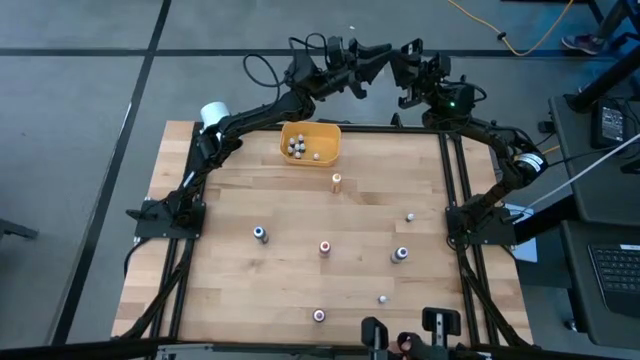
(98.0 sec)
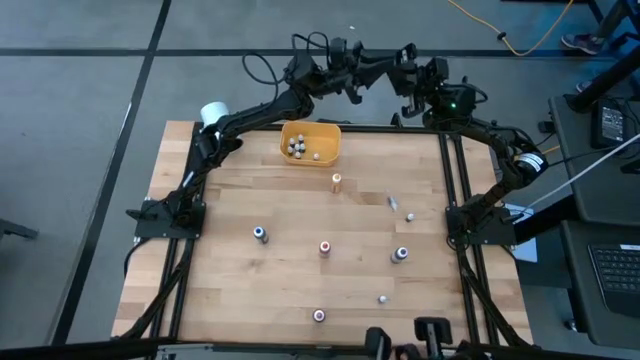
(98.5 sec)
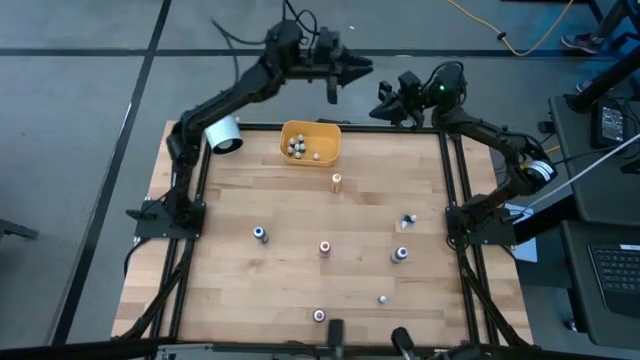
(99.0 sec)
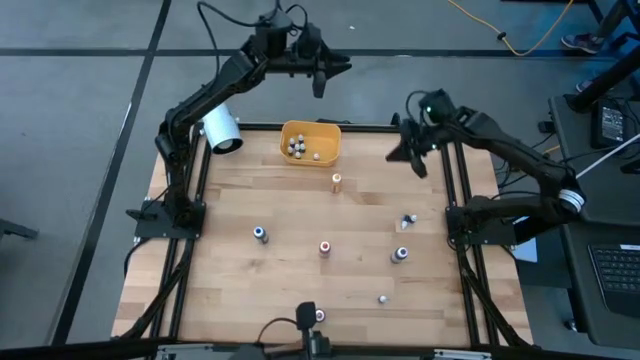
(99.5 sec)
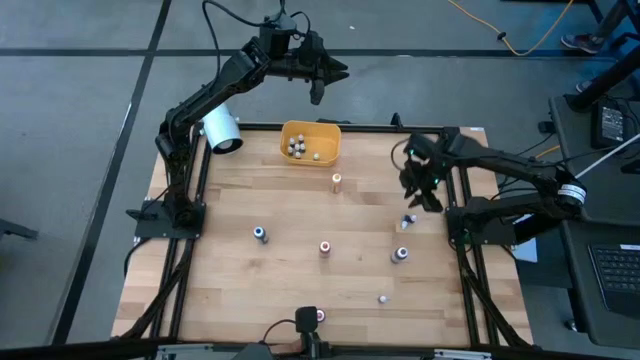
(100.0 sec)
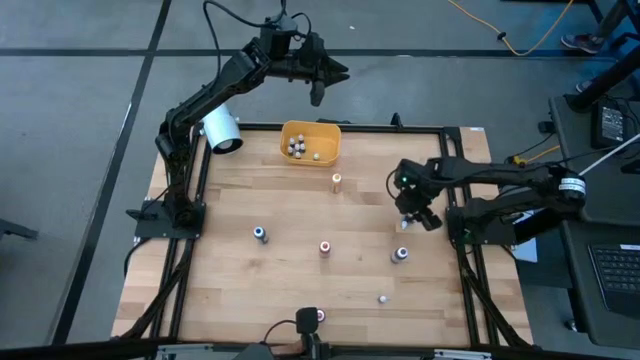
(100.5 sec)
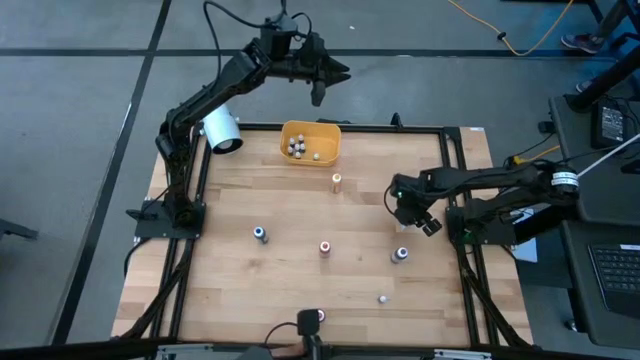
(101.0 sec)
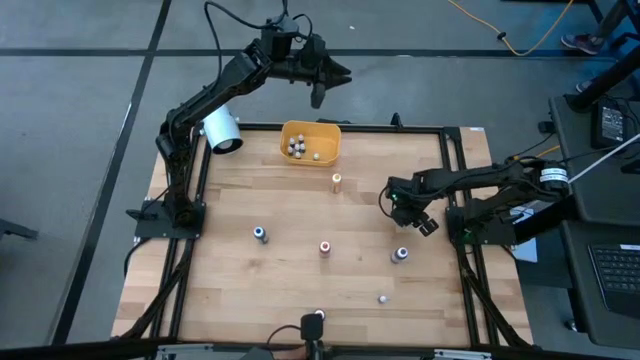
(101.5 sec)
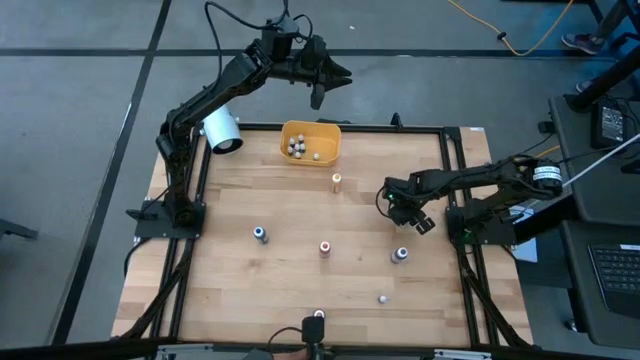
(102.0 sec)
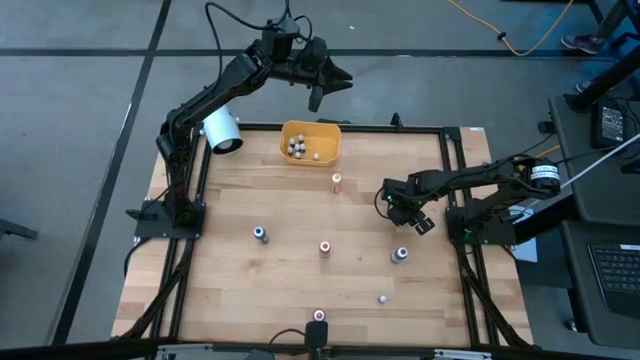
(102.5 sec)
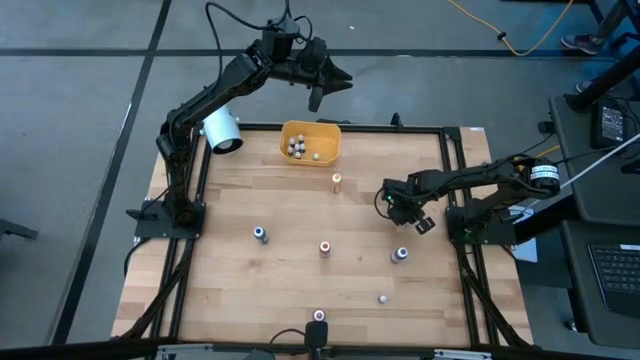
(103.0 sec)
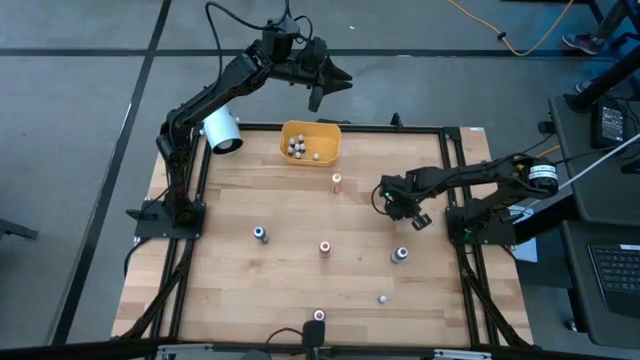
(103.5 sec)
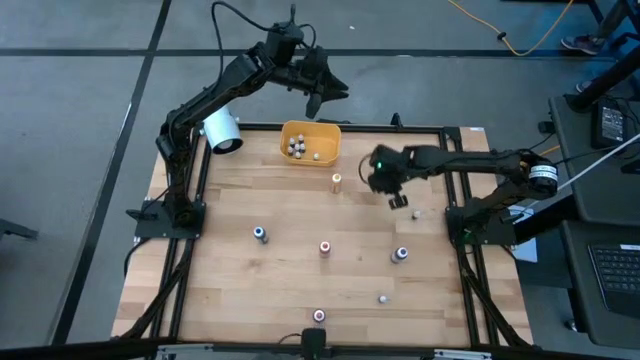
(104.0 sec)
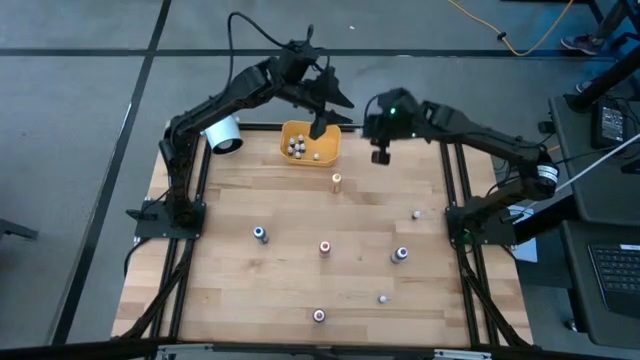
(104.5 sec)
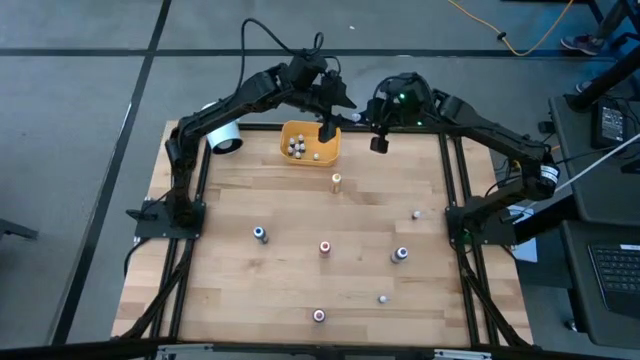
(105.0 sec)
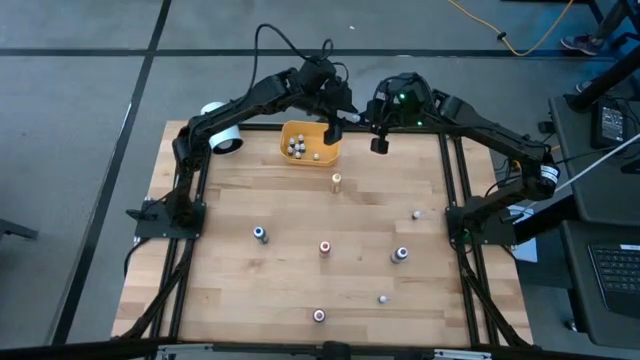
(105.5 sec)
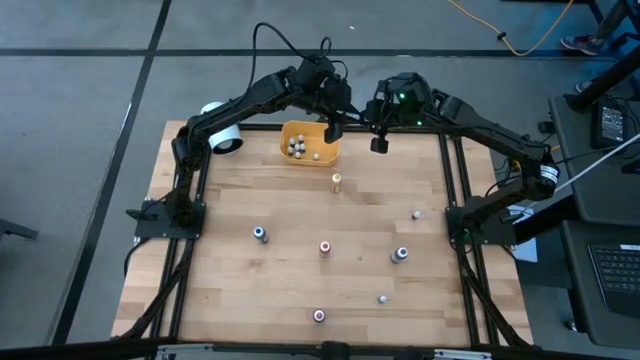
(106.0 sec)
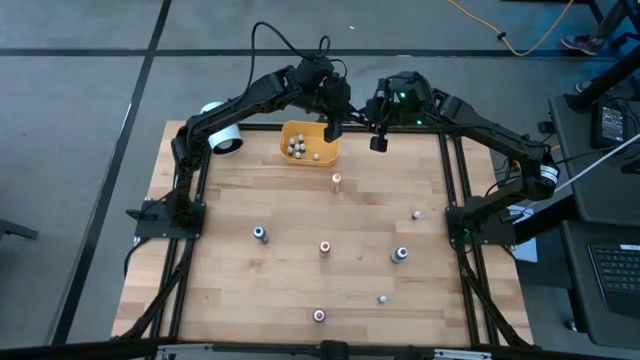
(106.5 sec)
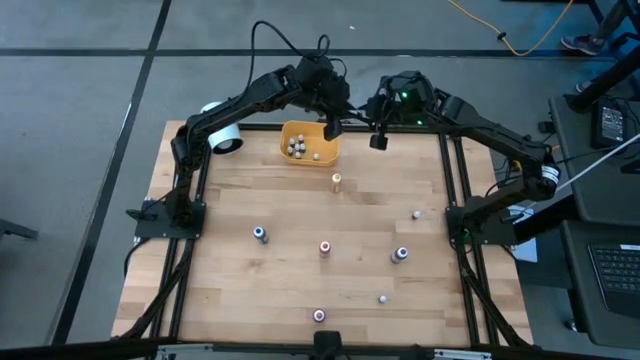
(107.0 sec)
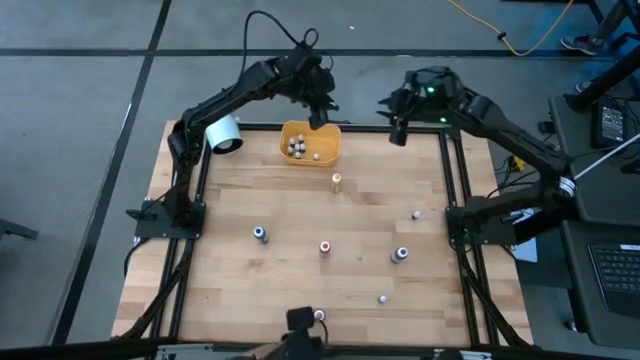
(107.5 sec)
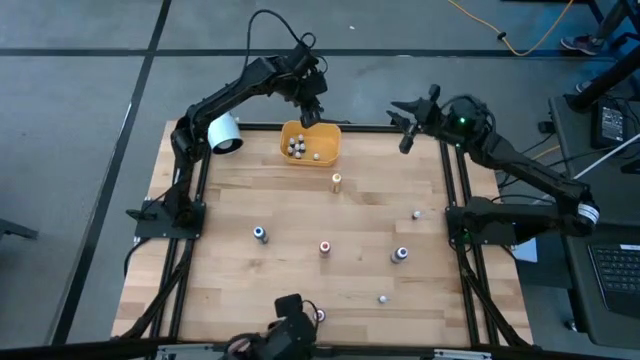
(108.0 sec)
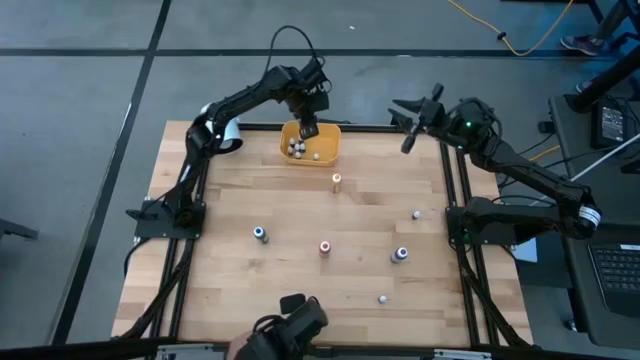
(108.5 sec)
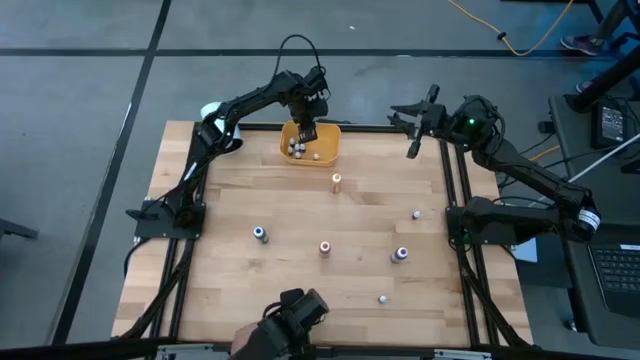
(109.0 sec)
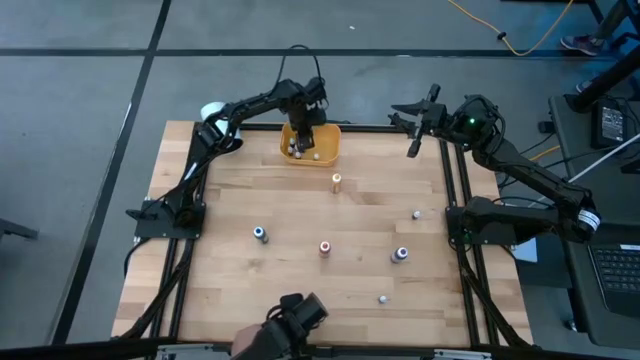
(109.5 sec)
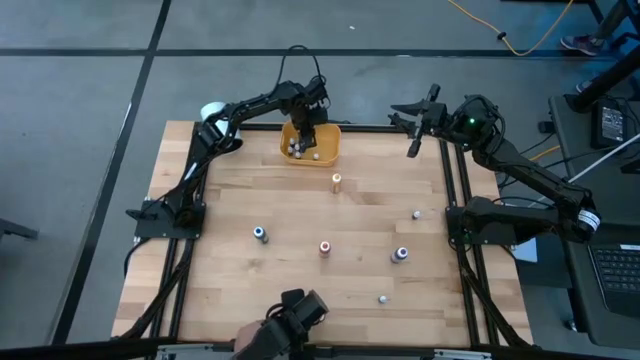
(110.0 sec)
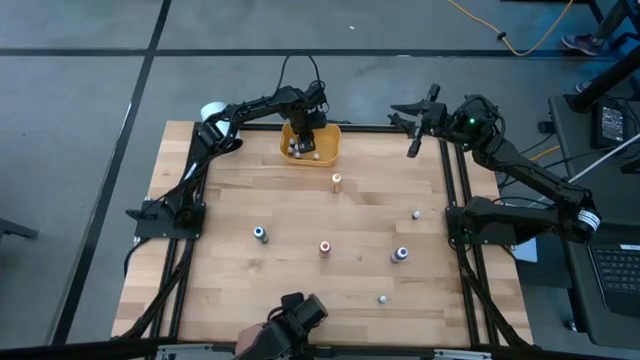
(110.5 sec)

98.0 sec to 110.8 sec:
Task: Pick & Place food coloring
Put the small blue food coloring bottle into the yellow bin

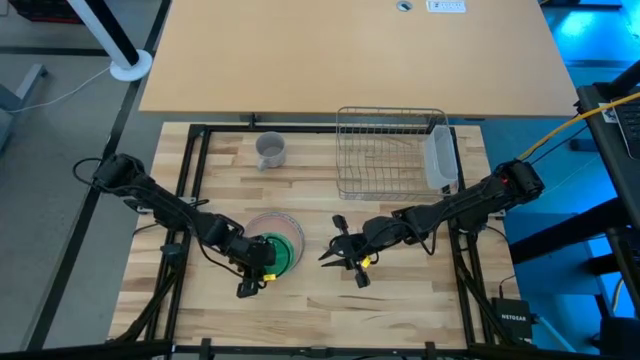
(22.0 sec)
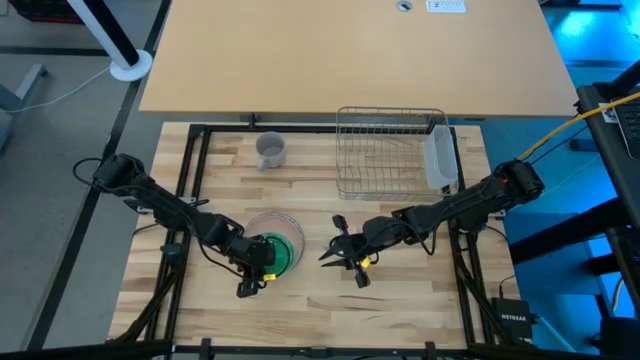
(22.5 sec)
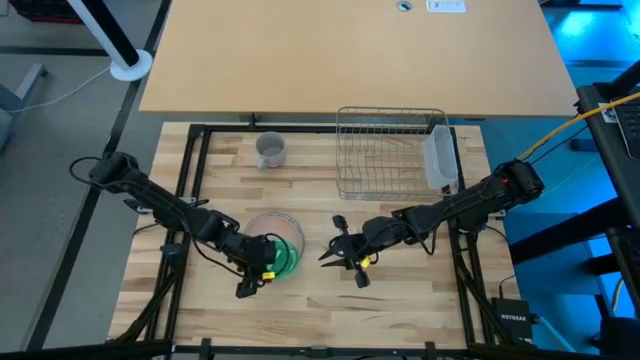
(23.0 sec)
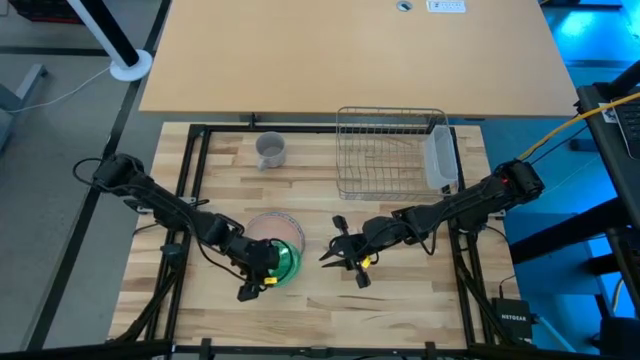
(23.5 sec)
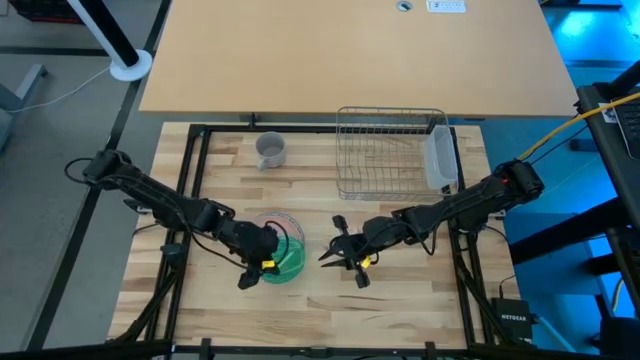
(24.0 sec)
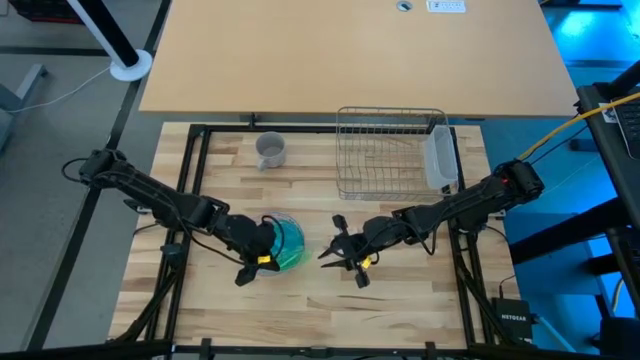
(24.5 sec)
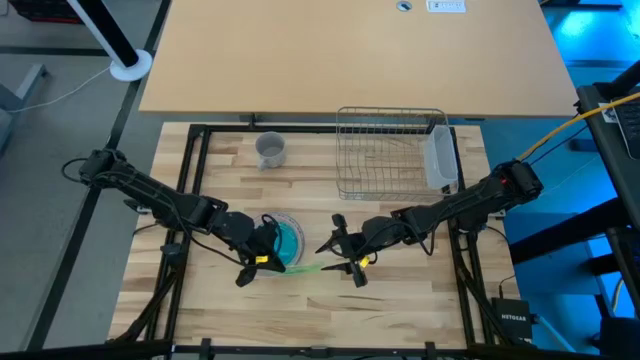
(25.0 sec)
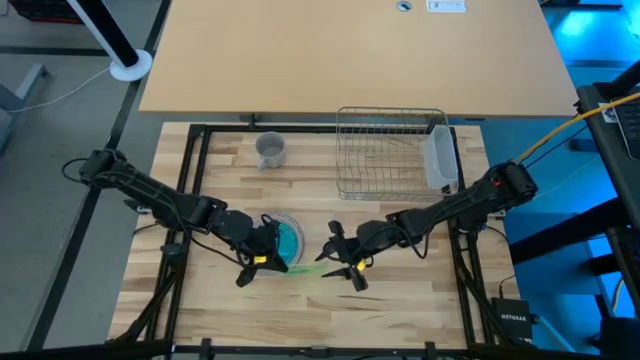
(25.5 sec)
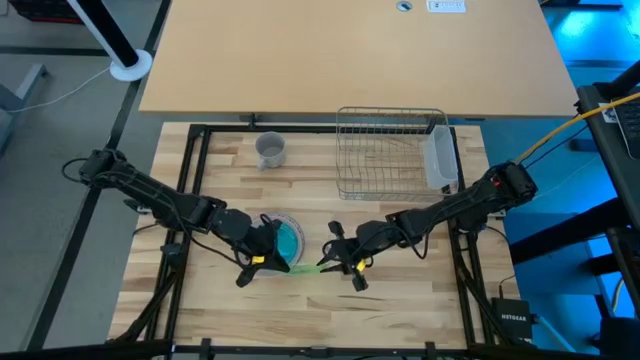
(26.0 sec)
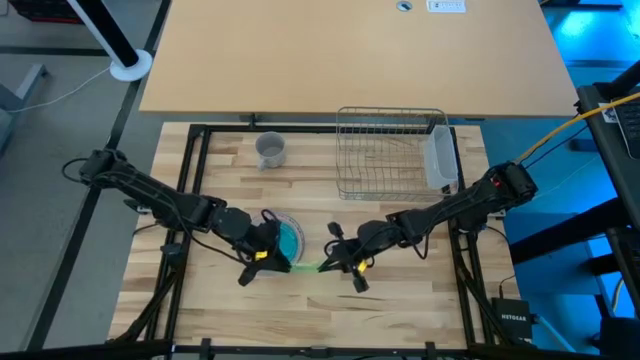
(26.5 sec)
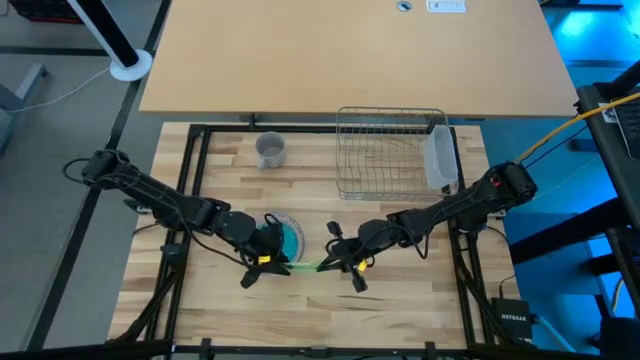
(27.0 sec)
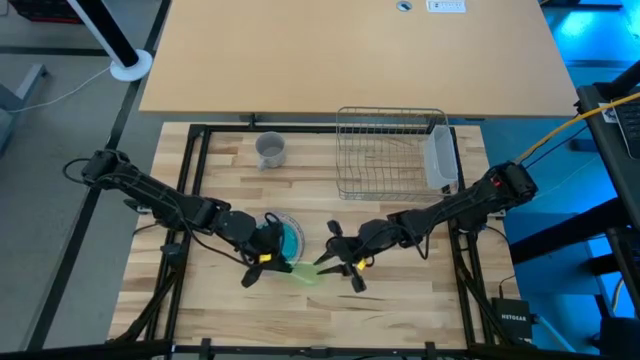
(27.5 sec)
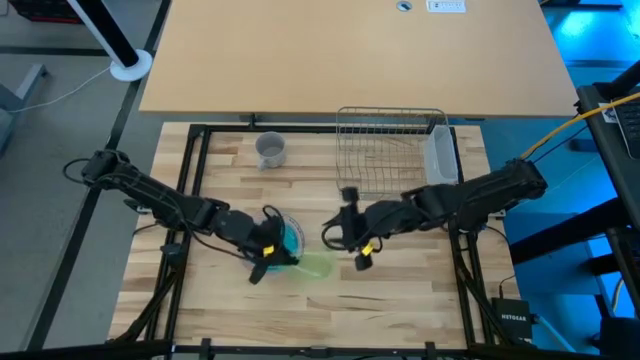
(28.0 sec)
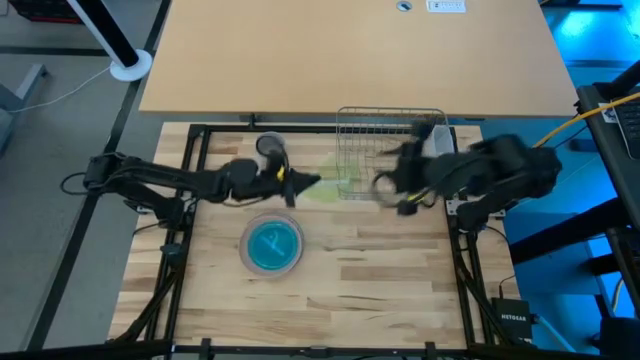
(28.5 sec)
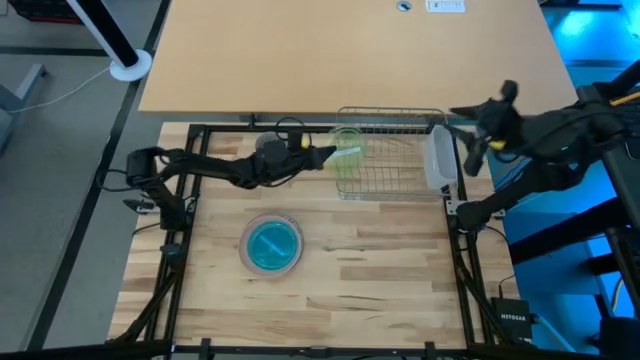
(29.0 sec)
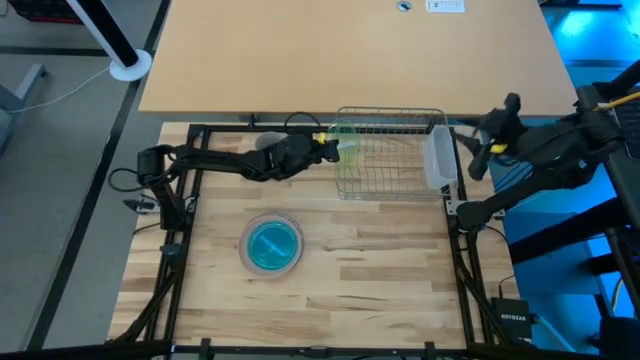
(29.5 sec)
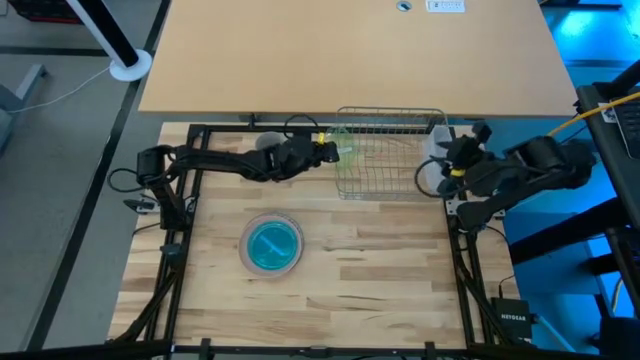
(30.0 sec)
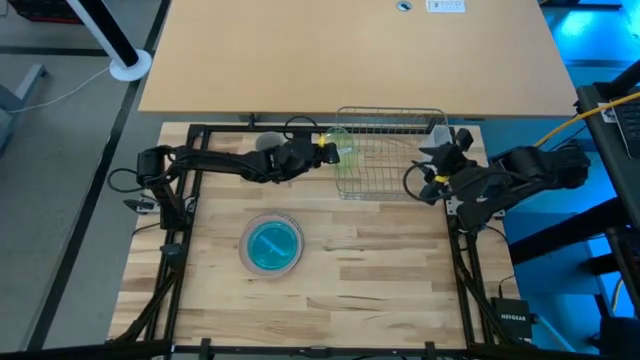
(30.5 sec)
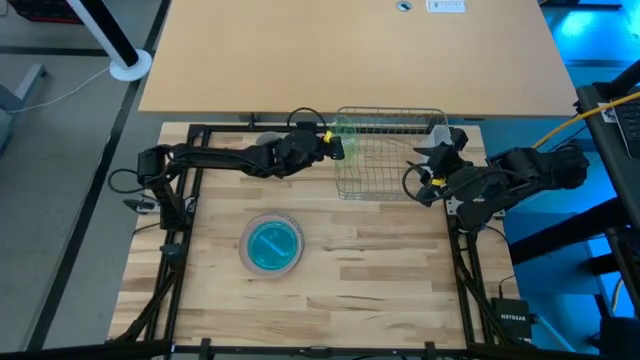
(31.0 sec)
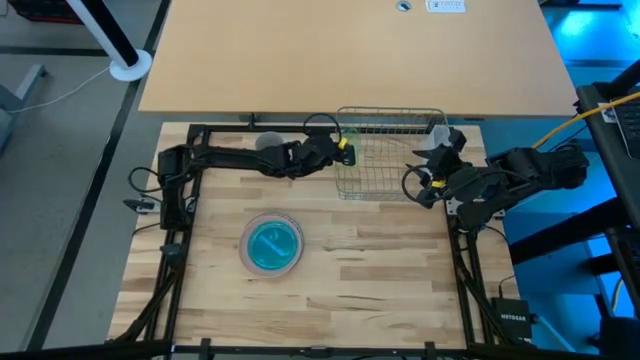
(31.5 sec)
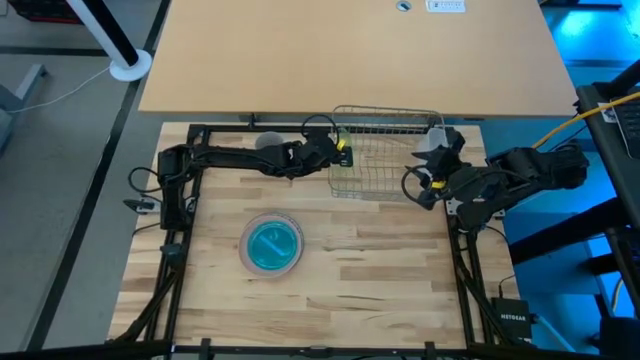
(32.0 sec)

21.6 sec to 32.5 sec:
Task: Sort dishes
Put the green plate into the dish rack
